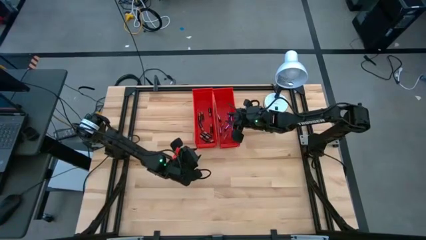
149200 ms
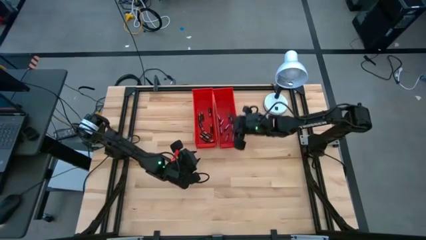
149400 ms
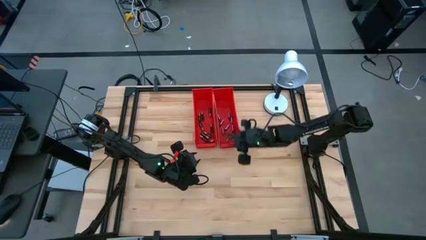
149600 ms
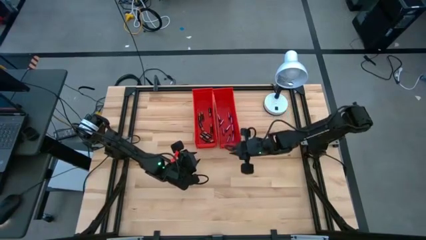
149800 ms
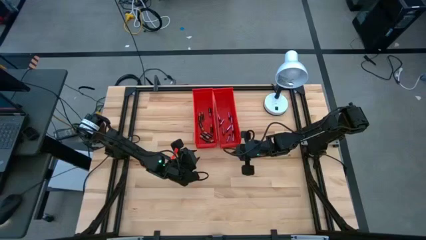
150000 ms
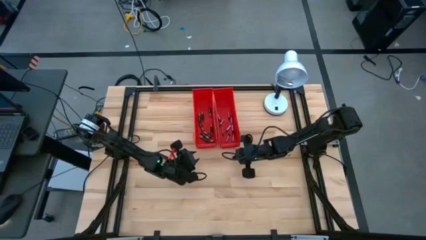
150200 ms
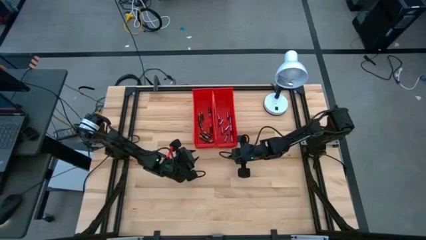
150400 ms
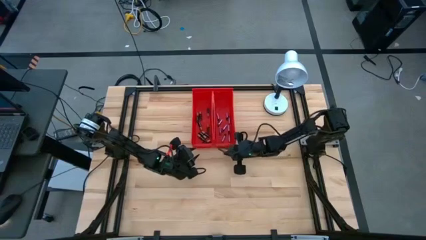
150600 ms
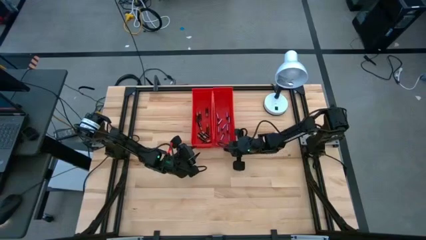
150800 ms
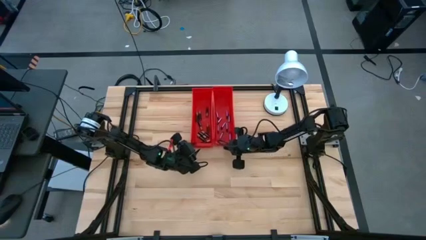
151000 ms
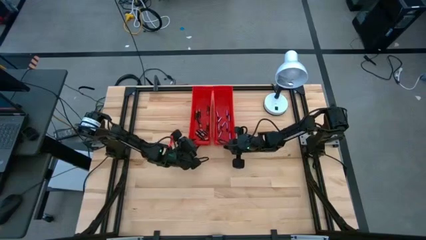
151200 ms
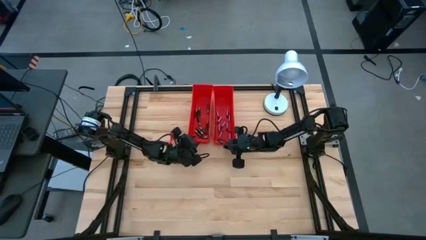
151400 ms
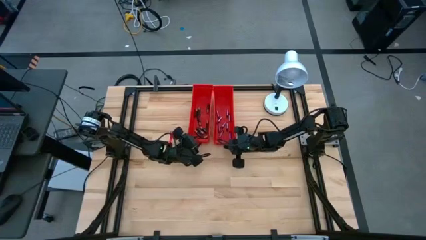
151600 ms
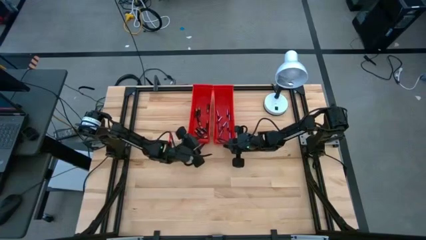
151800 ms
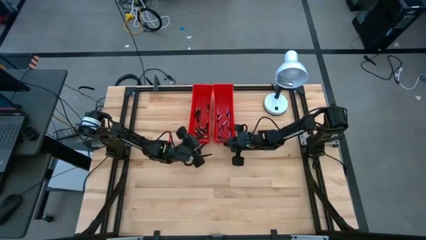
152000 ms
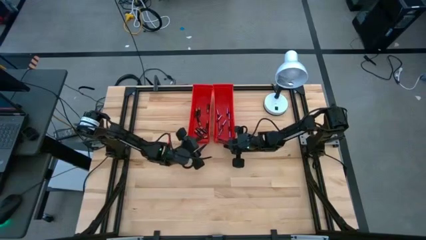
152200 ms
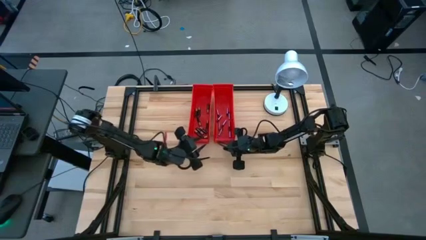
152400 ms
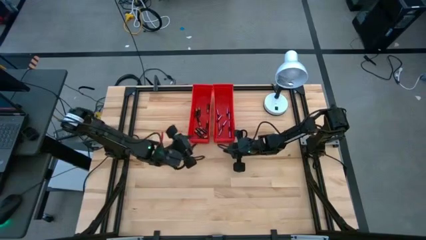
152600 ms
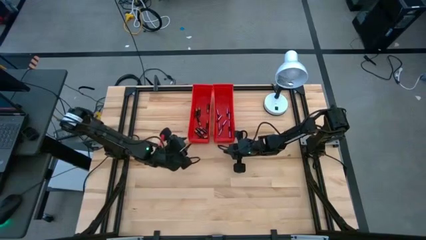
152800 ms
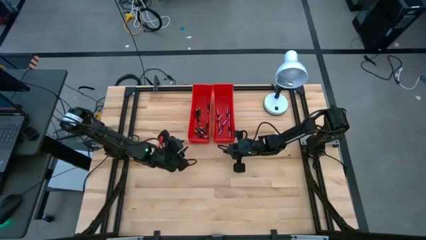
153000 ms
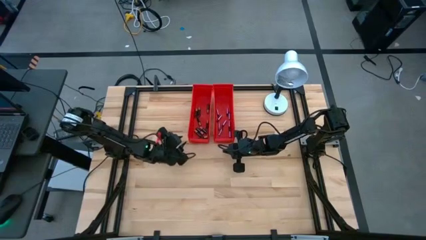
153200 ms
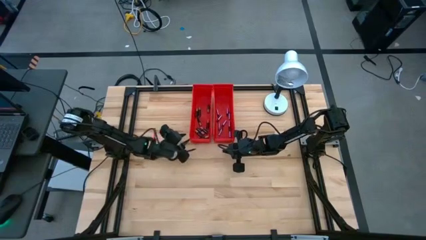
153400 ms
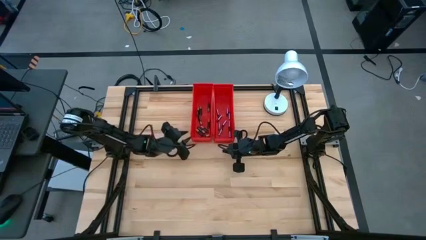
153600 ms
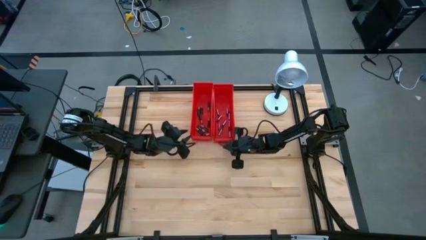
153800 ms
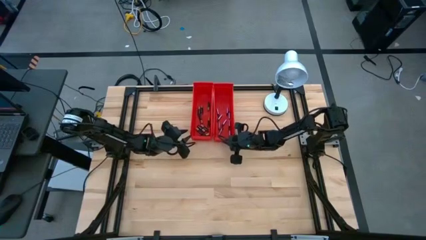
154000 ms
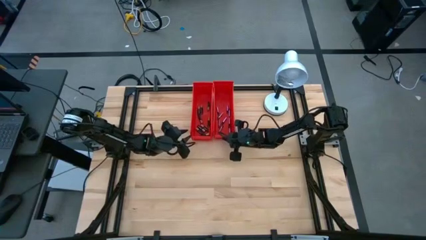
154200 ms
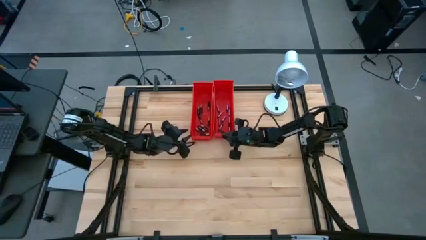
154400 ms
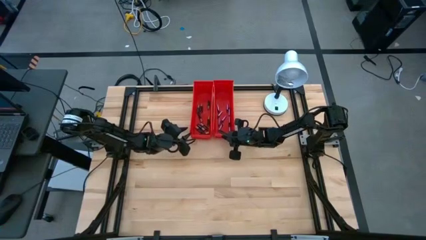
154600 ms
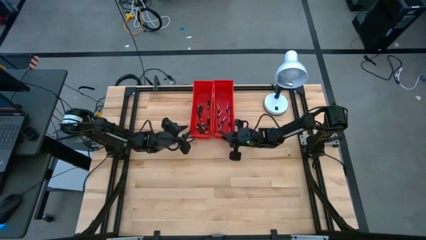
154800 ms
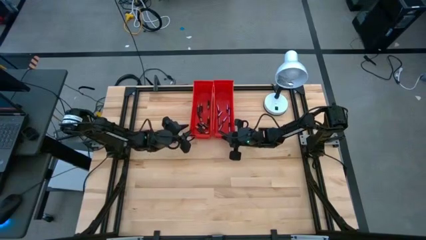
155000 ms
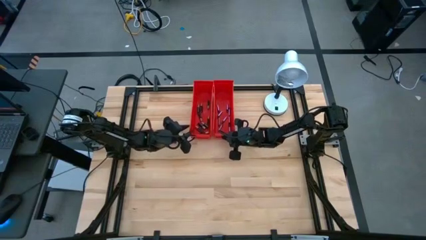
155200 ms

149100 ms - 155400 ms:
Task: Sort batteries
Adjust the red bins

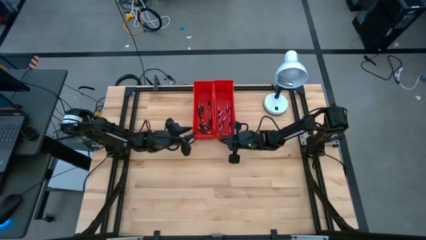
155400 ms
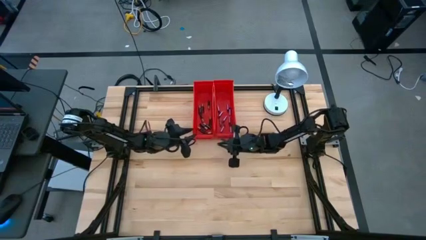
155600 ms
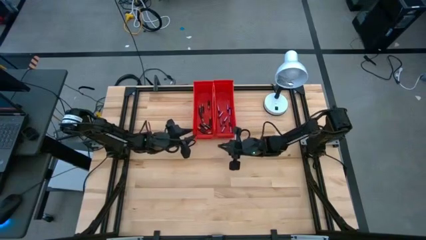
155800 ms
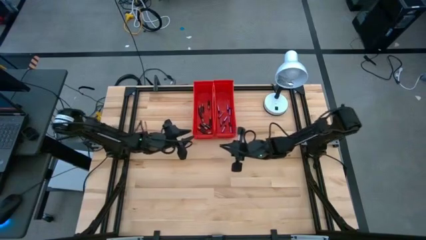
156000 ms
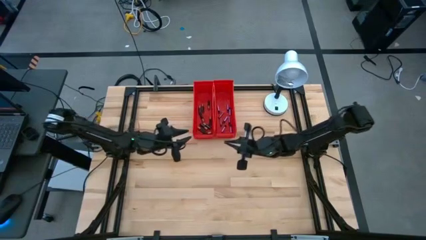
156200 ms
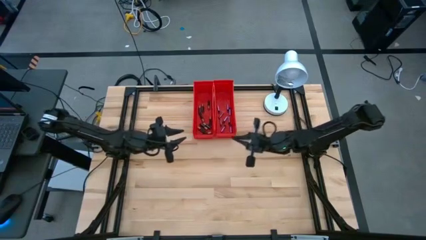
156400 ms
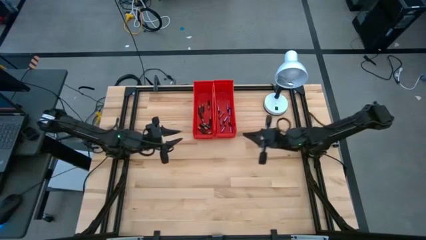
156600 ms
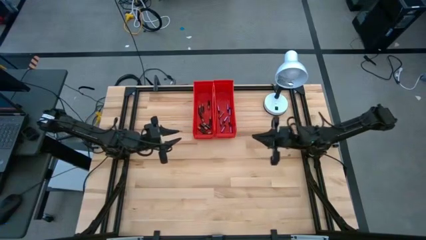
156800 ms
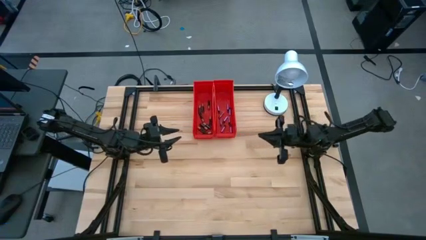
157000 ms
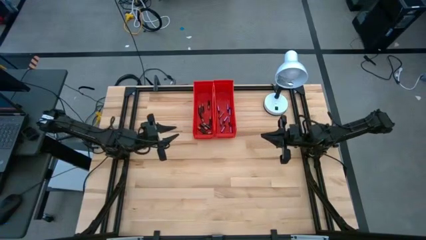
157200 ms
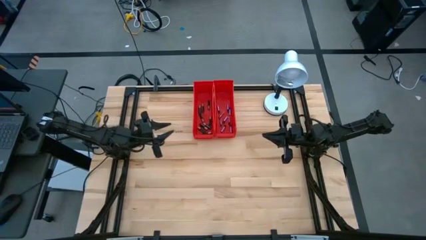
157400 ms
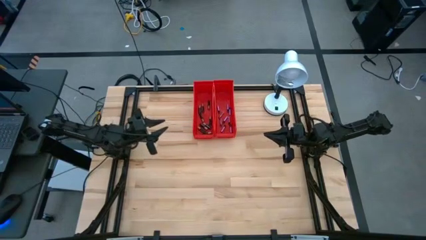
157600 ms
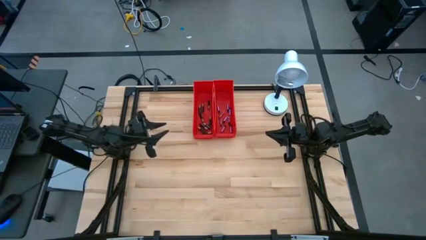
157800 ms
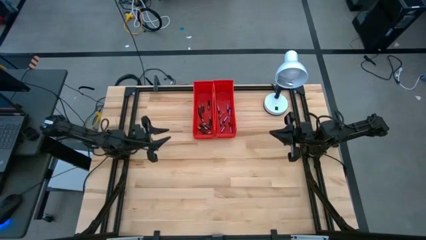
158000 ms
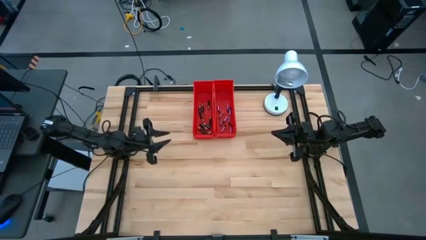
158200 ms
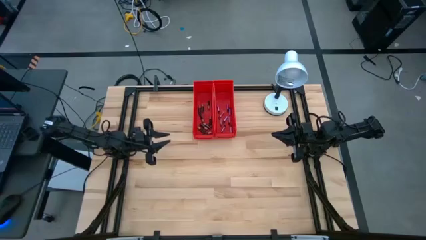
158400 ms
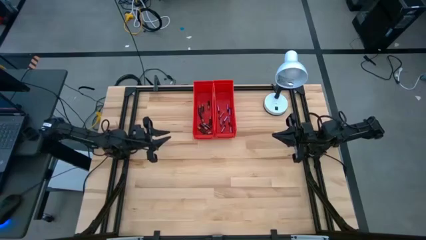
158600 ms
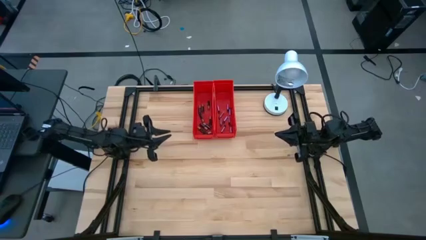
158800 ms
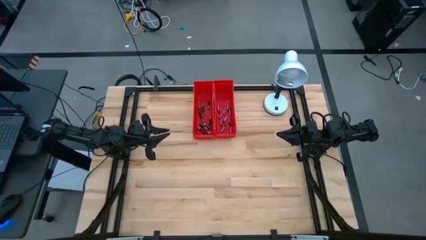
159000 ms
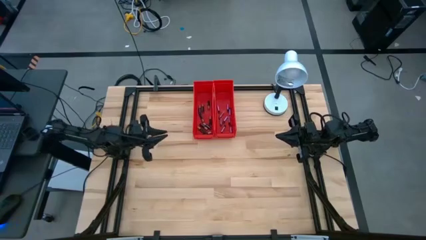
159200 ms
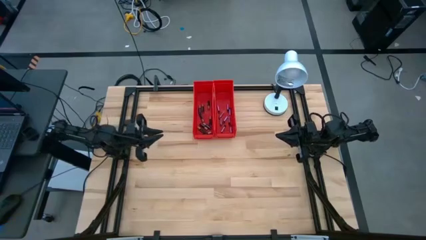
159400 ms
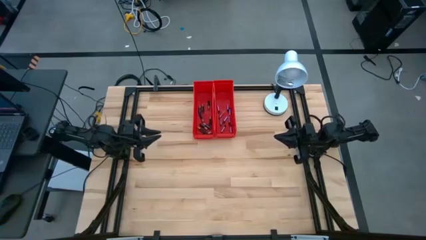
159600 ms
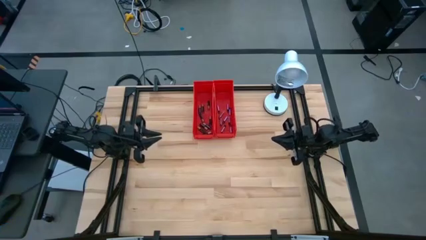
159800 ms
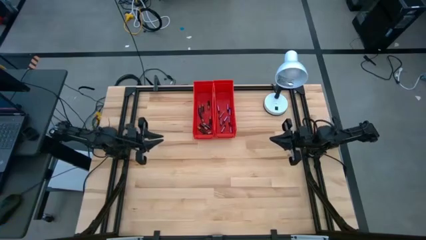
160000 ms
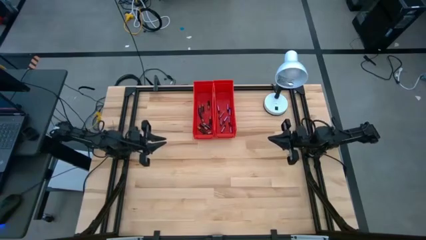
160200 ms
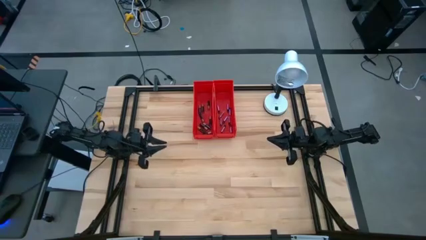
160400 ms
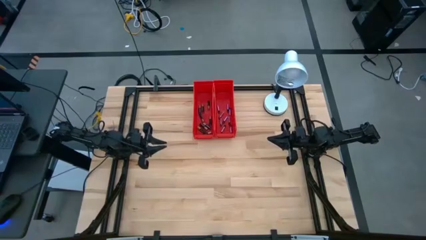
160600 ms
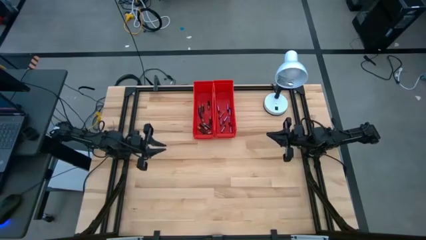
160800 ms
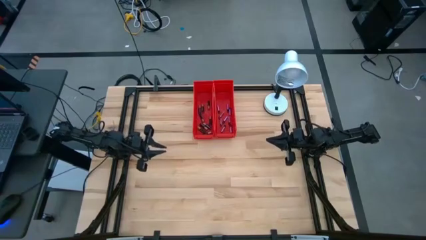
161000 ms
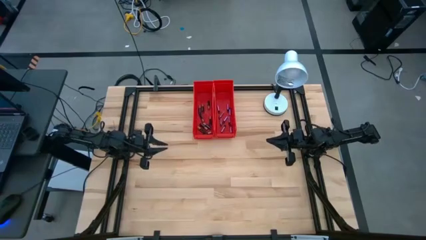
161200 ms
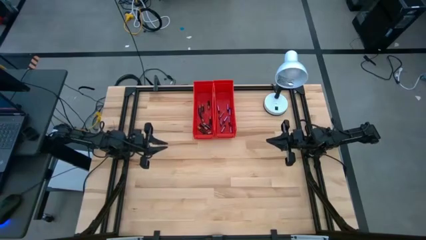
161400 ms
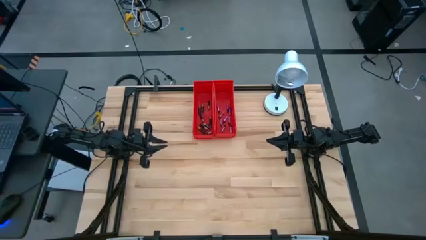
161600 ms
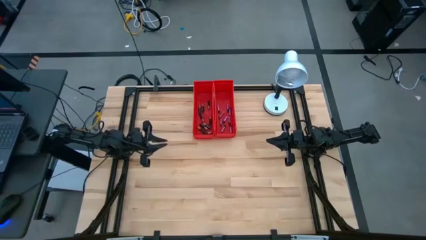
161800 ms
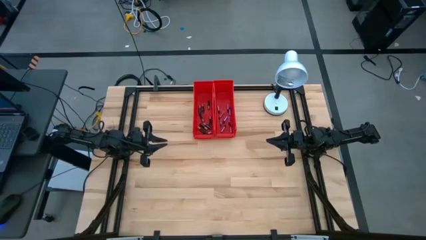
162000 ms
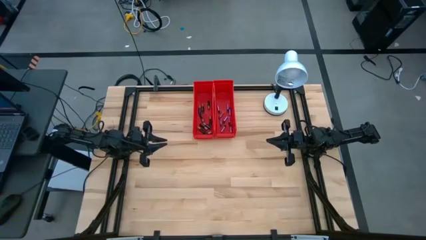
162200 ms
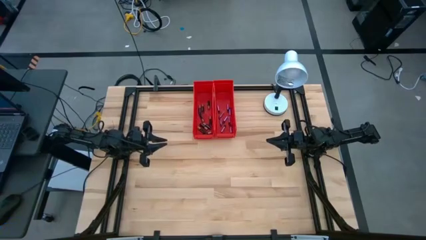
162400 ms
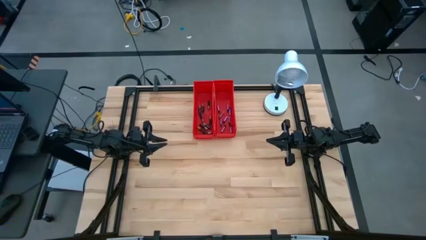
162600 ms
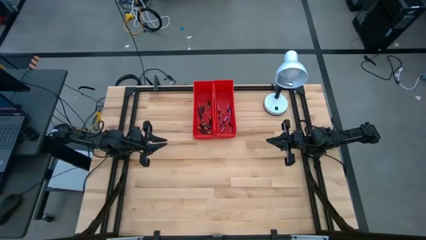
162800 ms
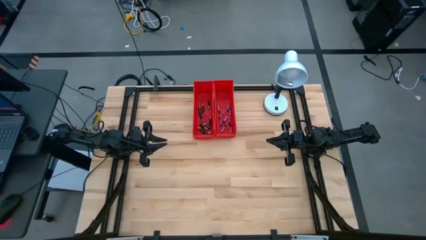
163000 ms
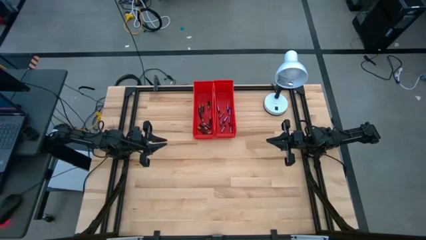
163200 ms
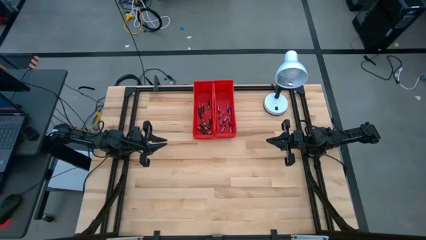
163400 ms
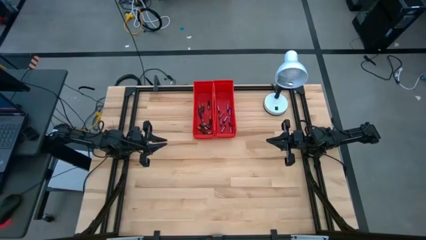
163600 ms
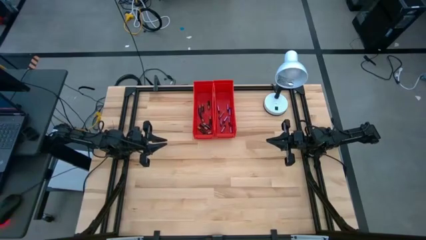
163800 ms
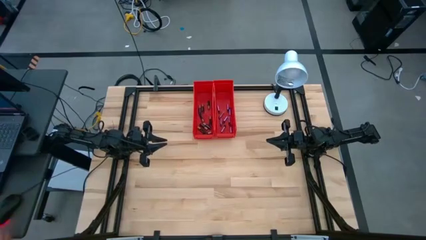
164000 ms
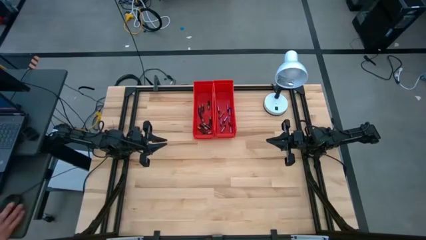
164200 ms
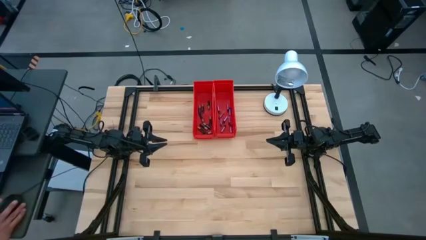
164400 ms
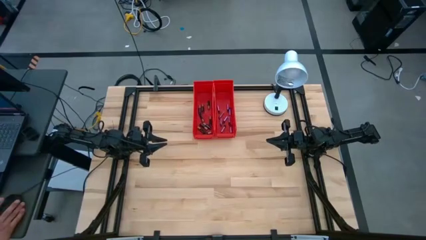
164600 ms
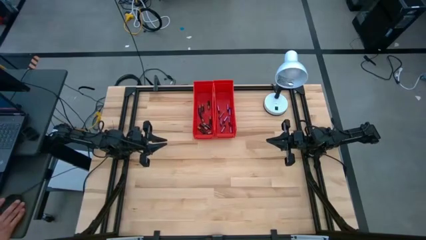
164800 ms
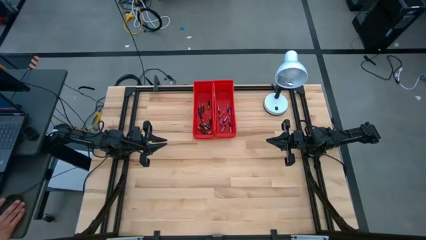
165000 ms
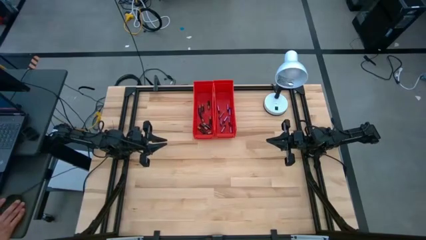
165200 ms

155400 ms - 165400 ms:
Return to Home Position
